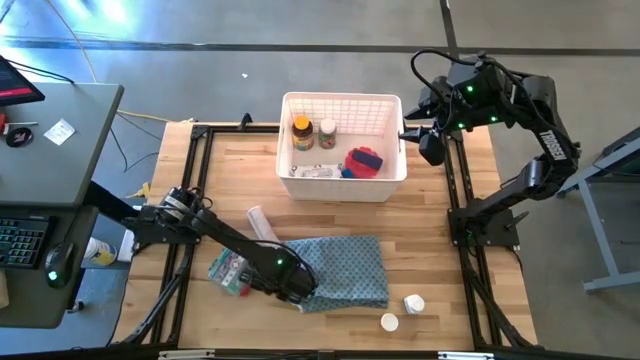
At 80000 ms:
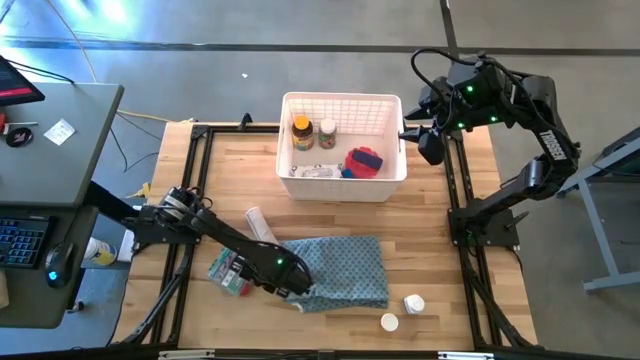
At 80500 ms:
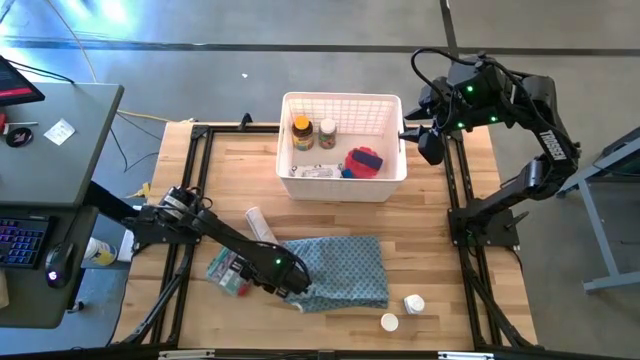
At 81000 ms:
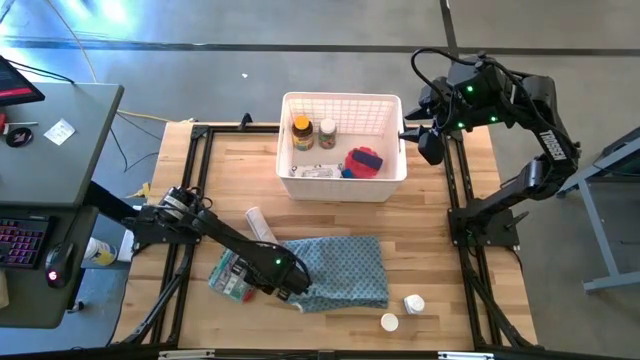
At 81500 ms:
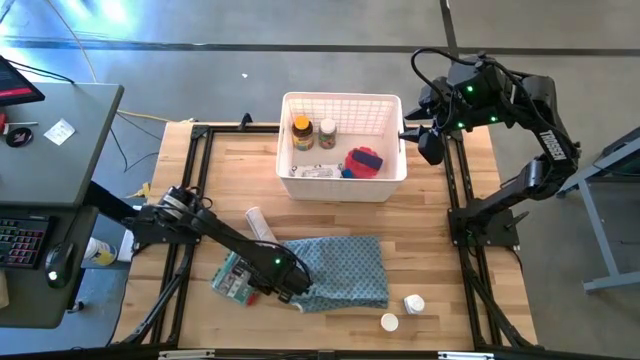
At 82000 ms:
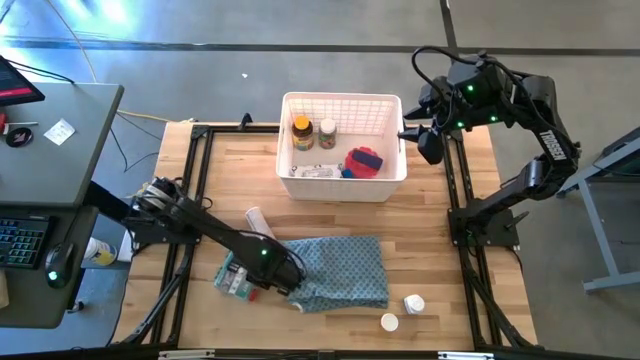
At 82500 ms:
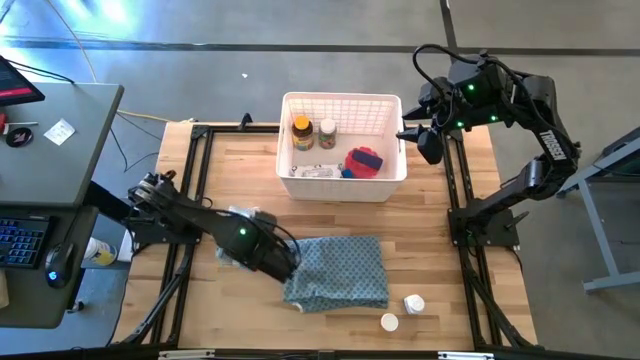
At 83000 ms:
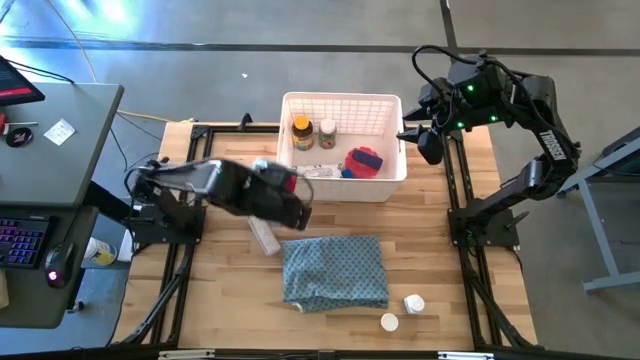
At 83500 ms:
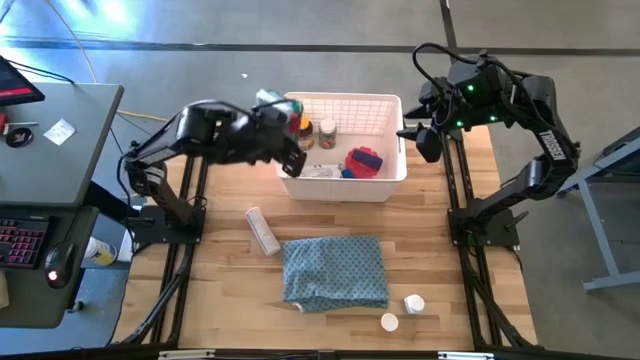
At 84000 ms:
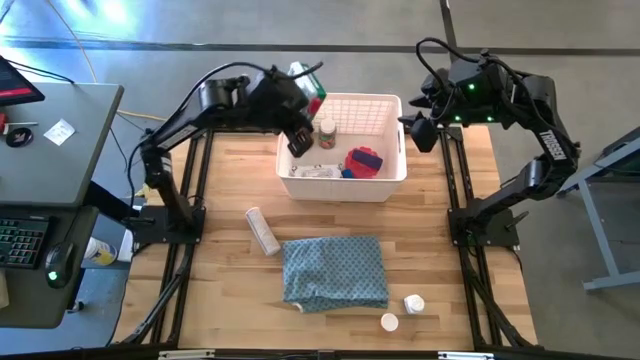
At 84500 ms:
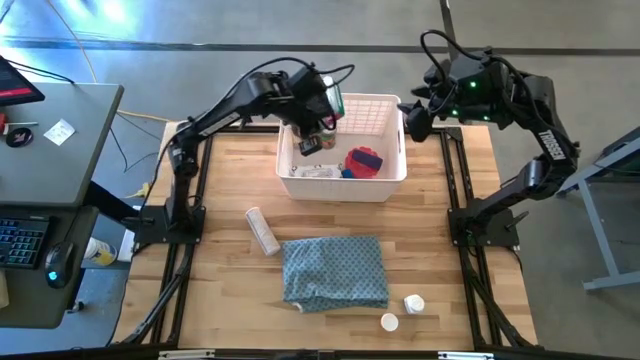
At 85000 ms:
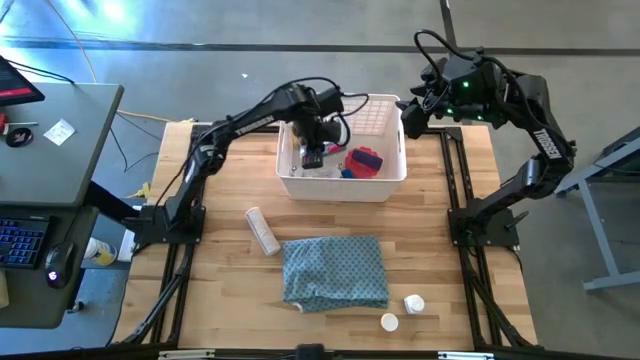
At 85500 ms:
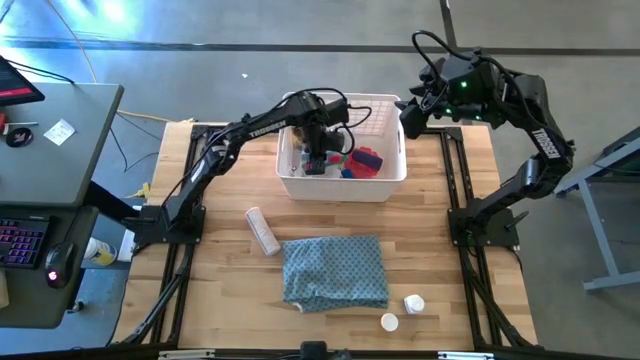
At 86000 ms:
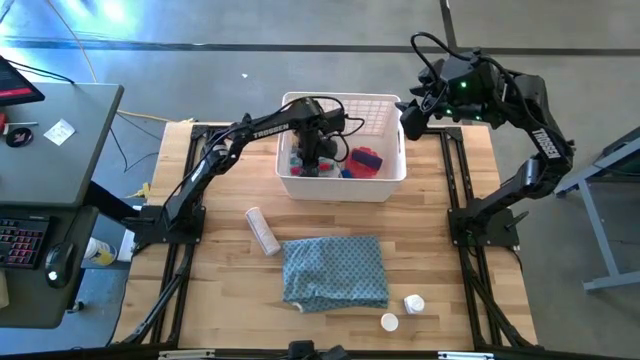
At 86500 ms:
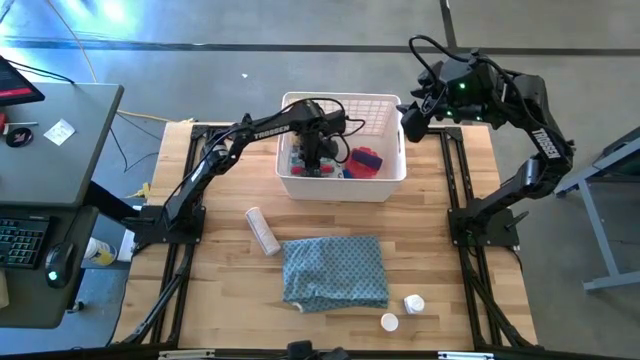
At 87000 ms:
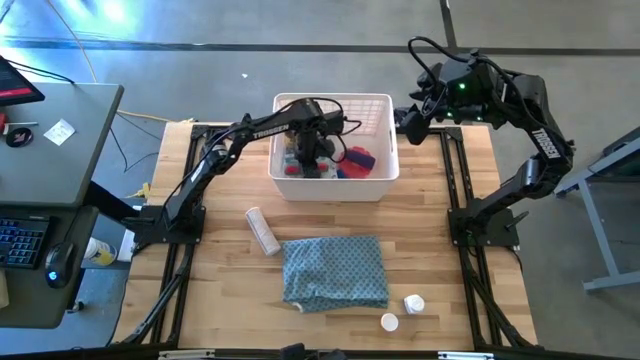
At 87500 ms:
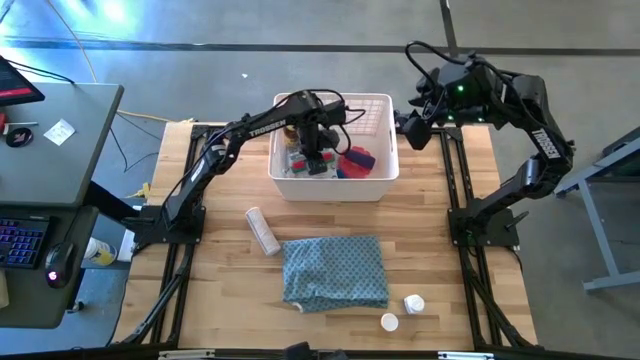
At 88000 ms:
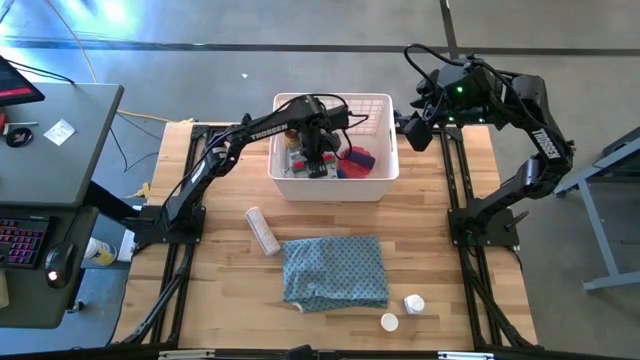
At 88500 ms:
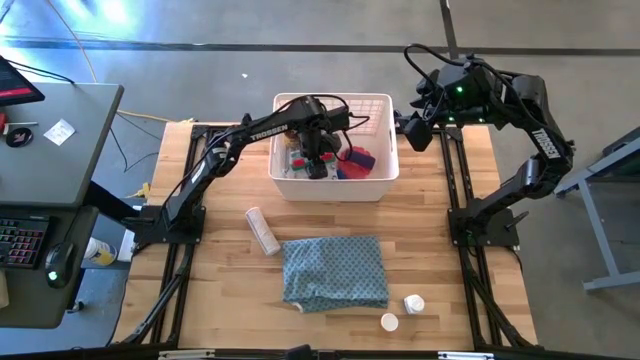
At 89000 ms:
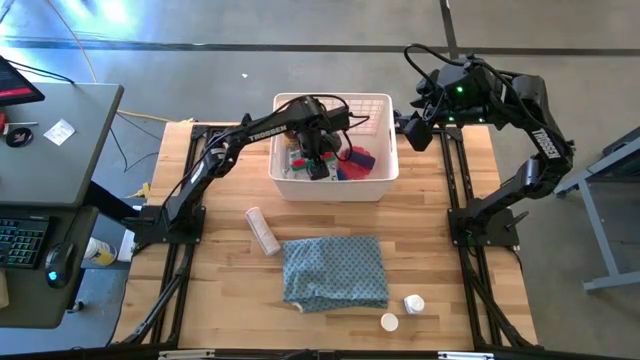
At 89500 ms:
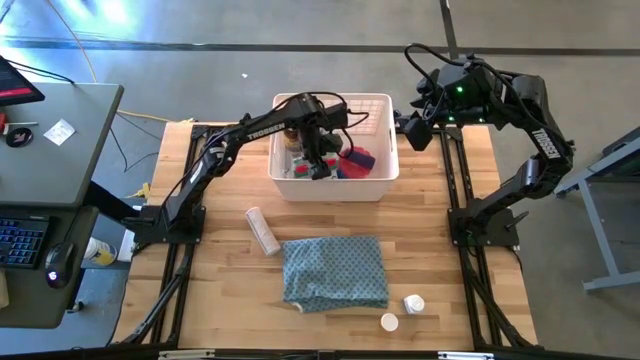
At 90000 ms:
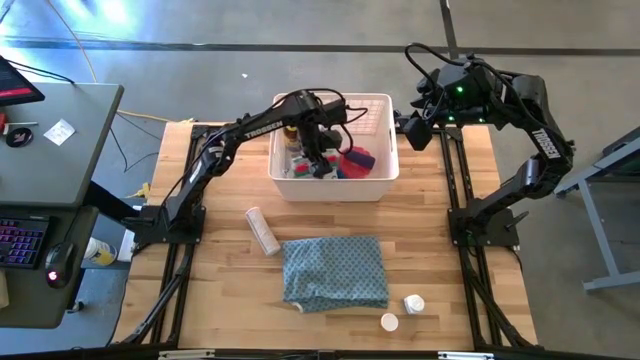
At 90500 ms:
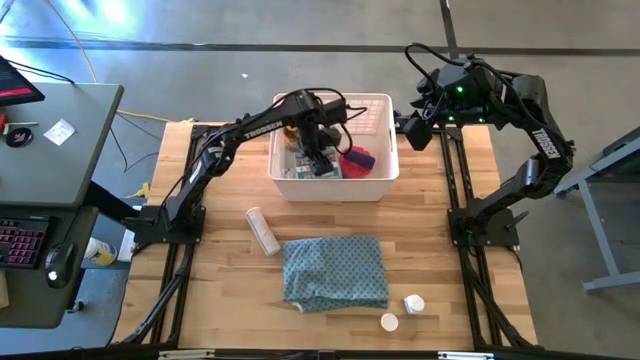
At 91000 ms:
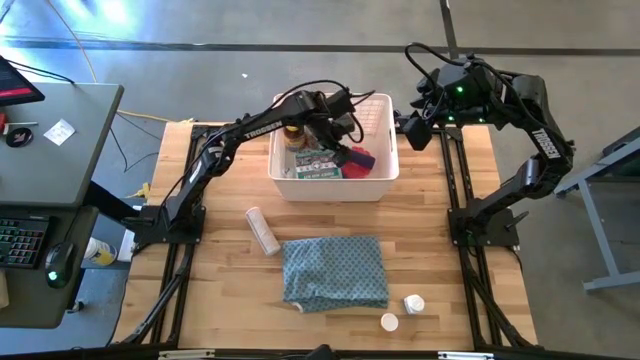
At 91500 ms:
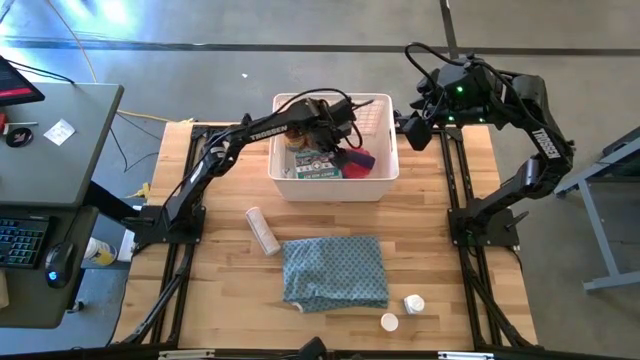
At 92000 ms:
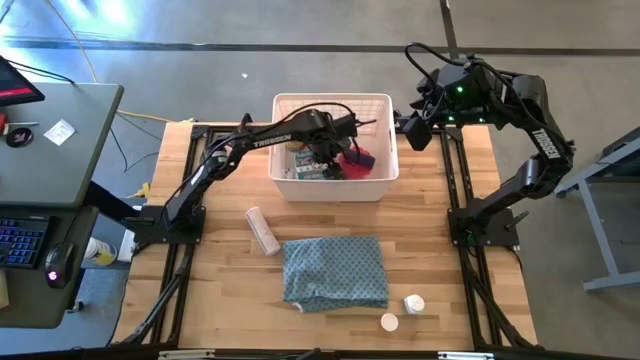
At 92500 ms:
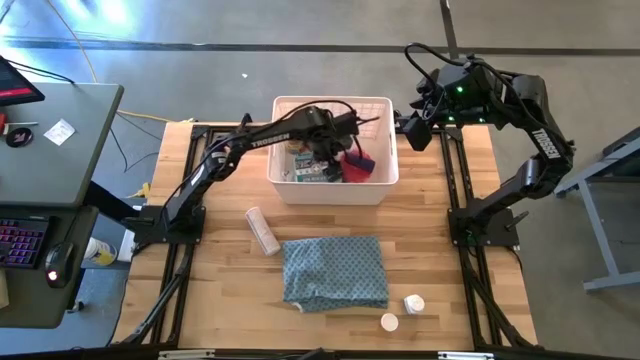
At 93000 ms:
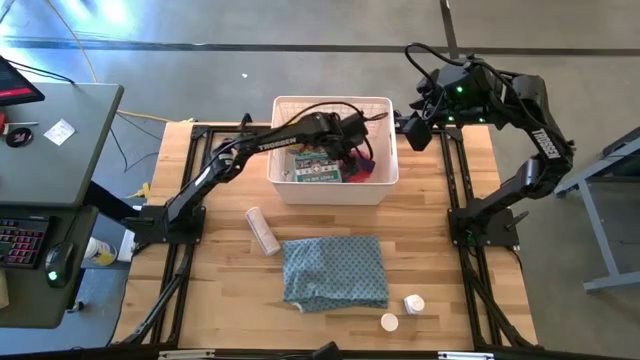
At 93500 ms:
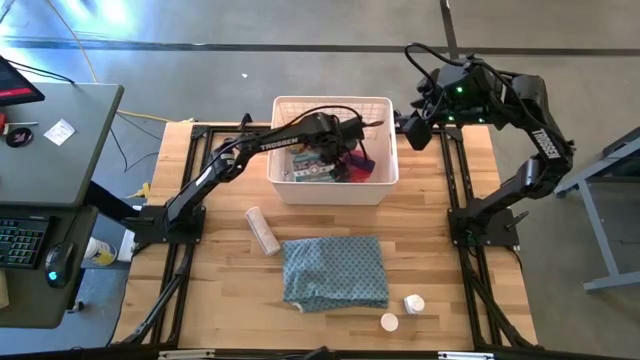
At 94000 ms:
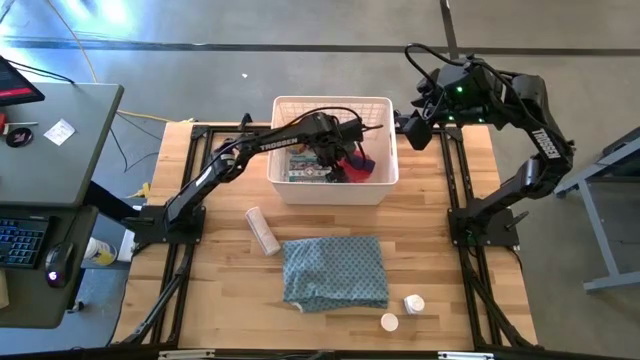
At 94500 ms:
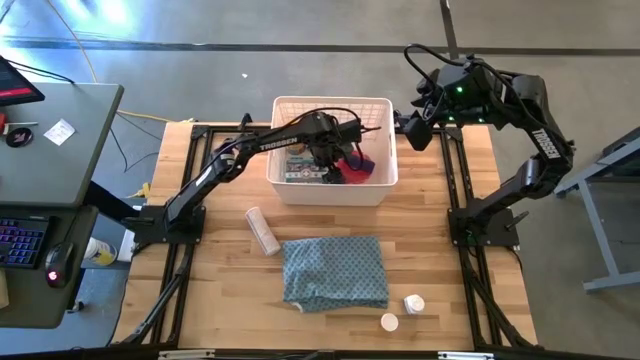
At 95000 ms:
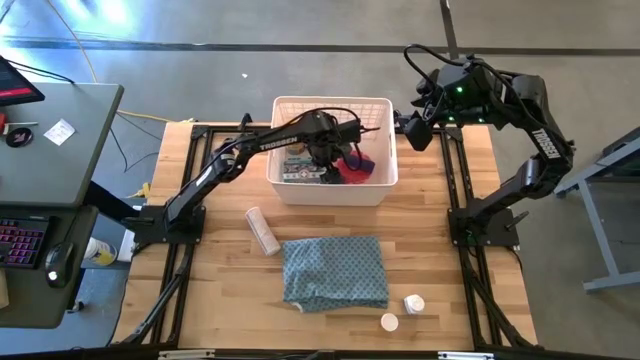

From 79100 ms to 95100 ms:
Task: Pick & place medical supplies in basket/bin
Put the first aid kit into the white bin

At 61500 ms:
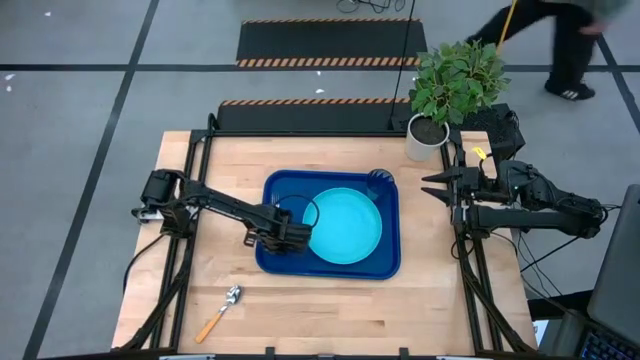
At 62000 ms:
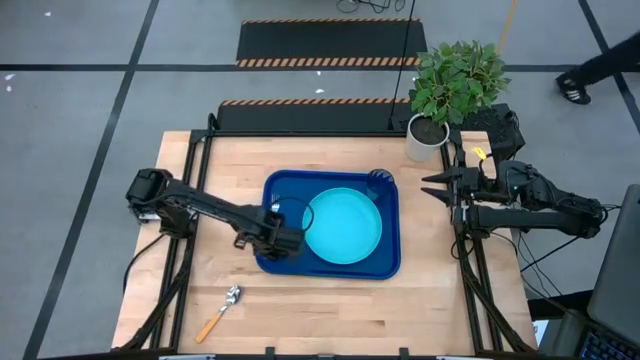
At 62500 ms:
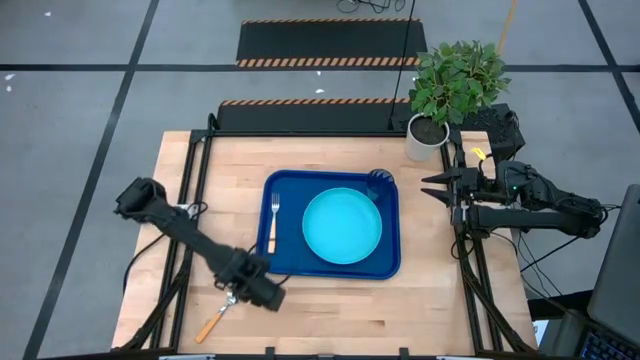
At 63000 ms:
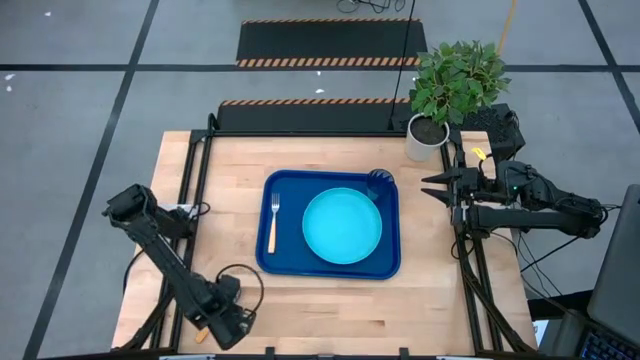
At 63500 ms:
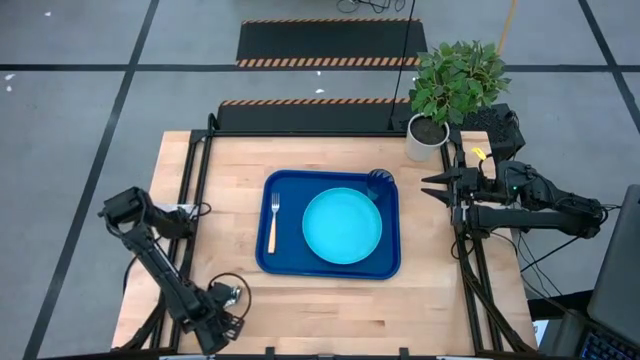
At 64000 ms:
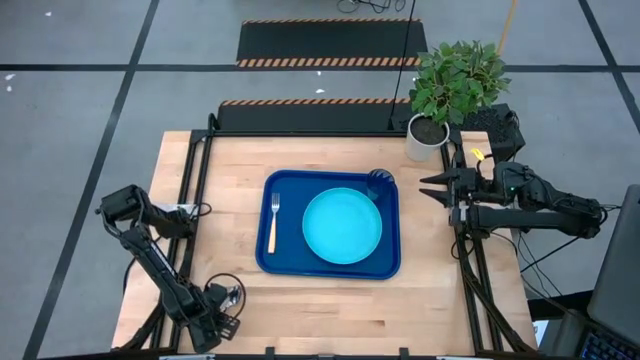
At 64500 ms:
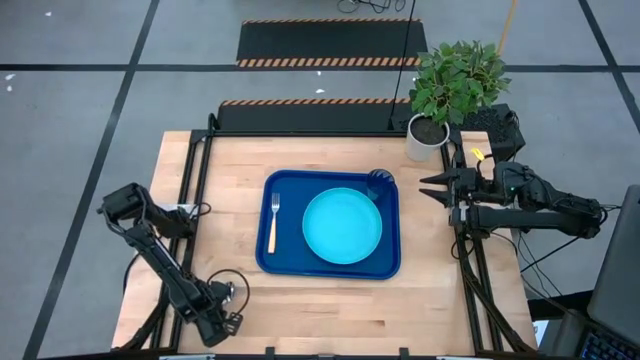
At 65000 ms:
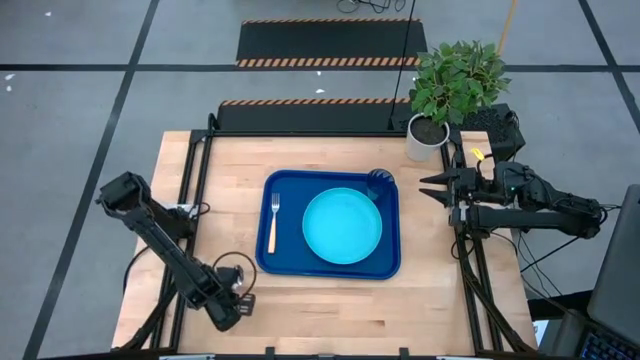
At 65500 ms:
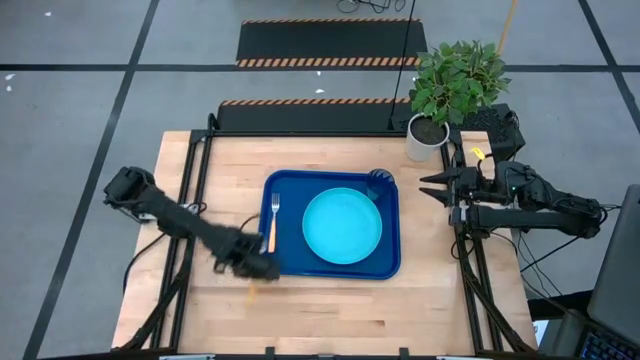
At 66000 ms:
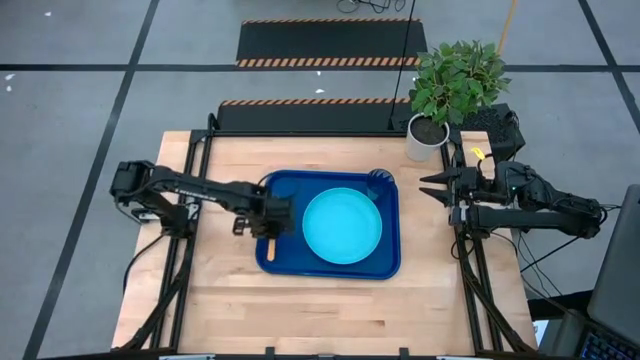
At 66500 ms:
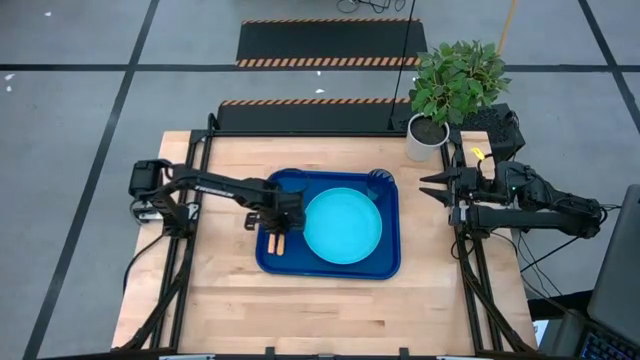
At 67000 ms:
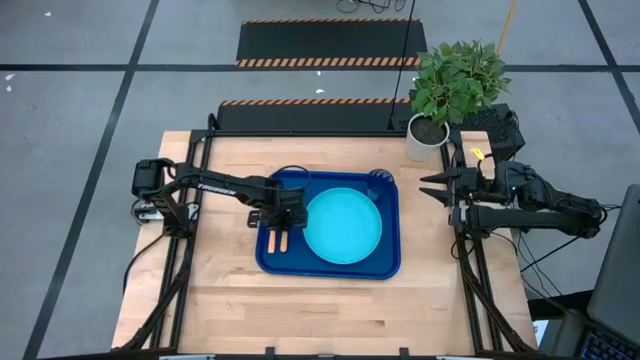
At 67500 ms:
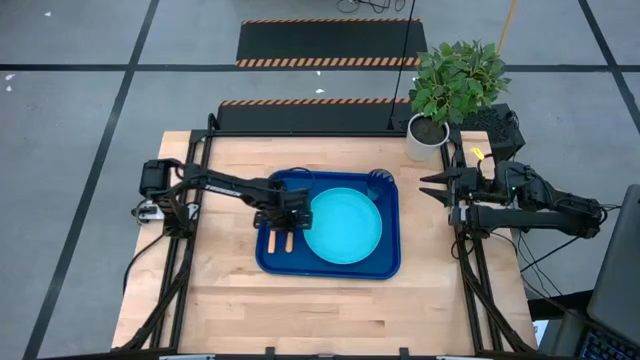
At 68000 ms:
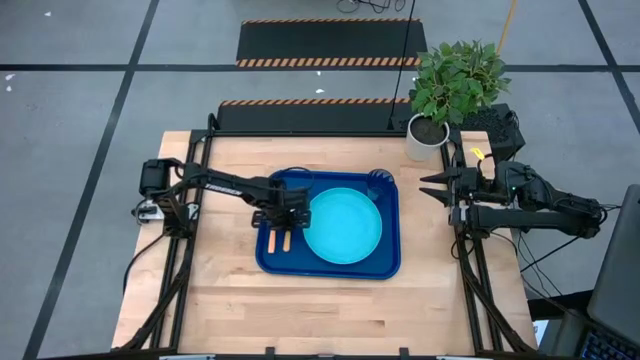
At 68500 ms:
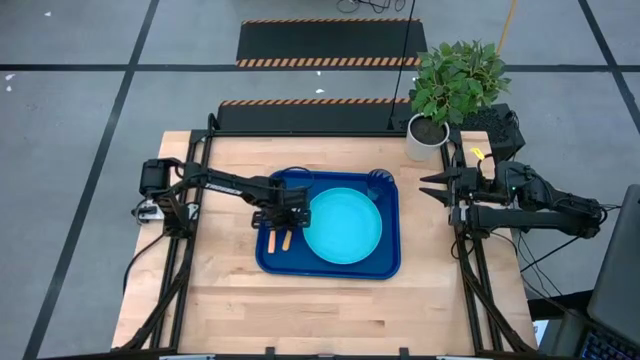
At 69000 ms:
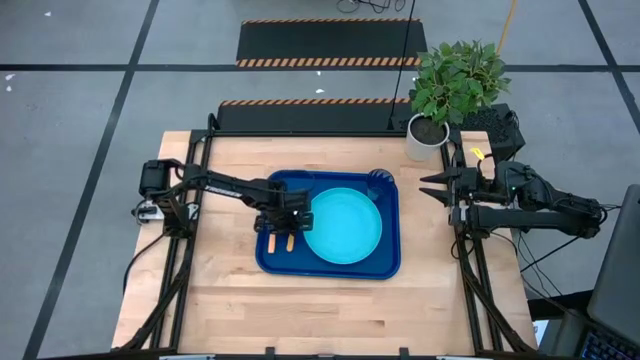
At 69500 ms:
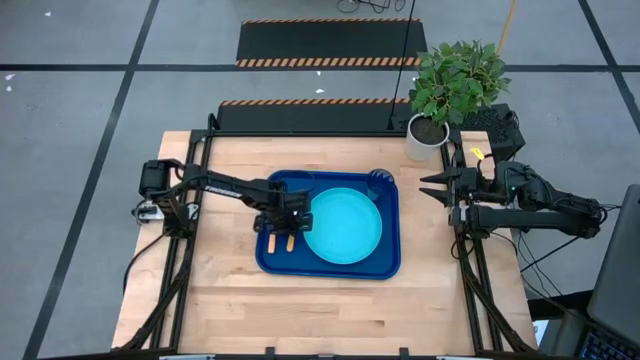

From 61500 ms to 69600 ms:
Task: Pick and place plate/cup/fork/spoon on tray
Put the orange spoon on the blue tray to the left of the light blue plate
